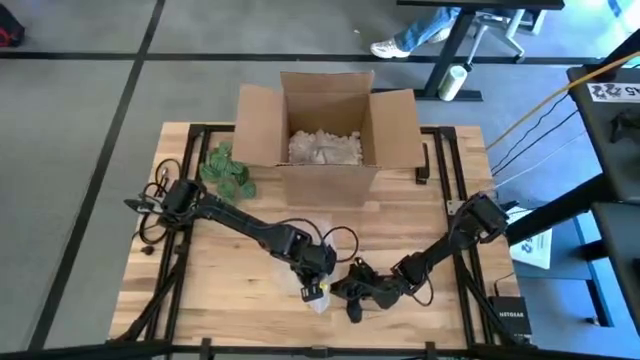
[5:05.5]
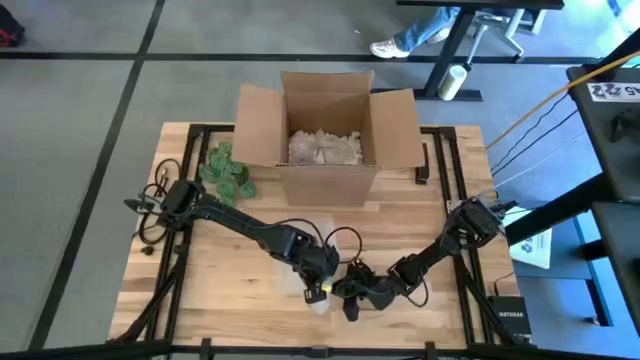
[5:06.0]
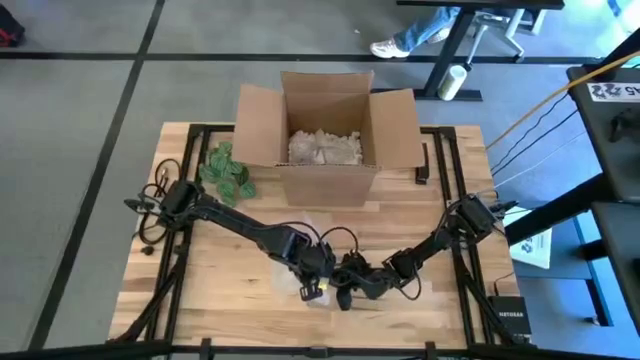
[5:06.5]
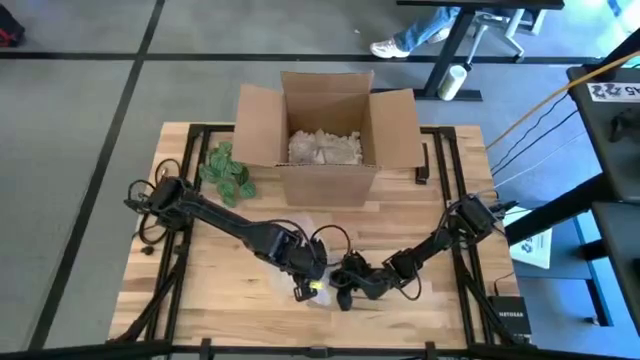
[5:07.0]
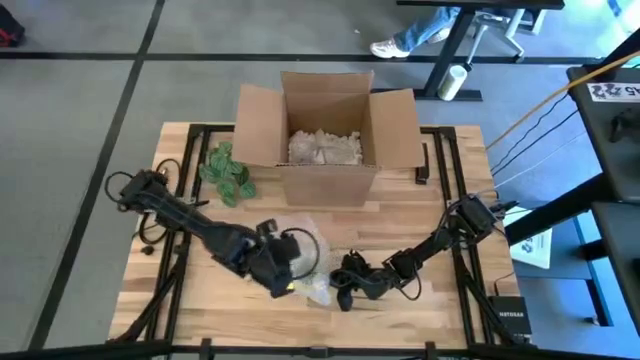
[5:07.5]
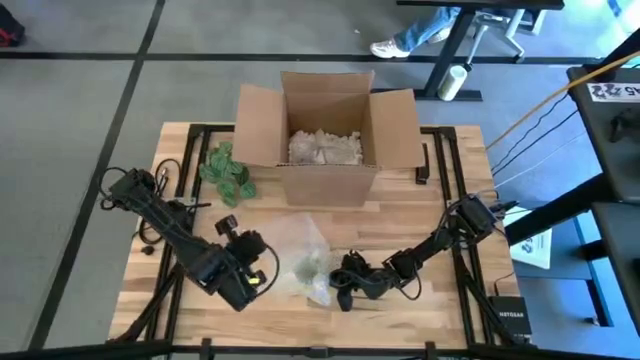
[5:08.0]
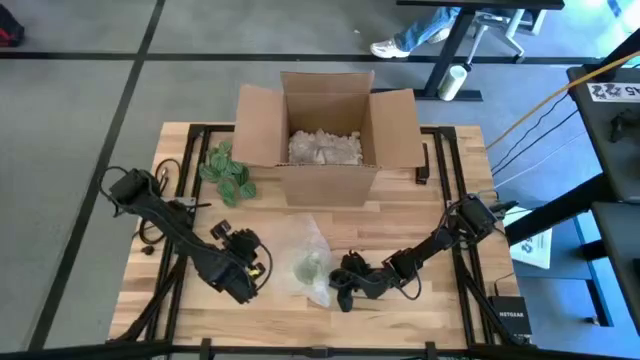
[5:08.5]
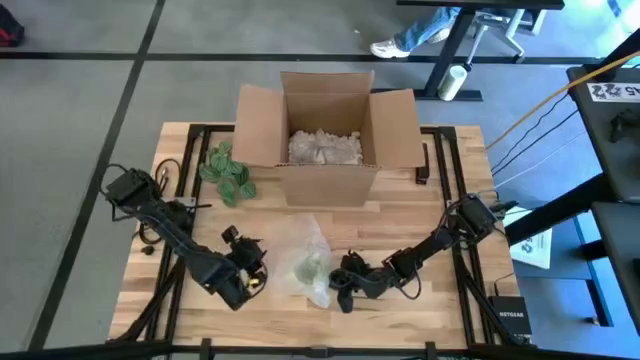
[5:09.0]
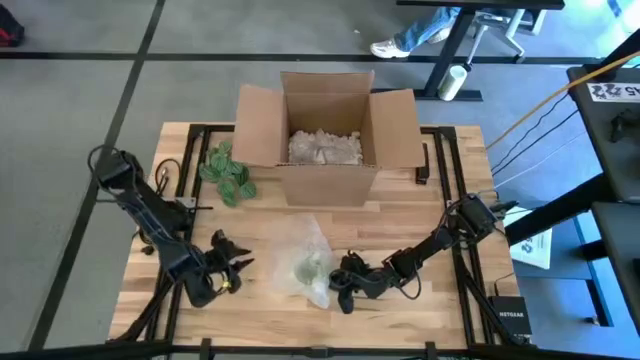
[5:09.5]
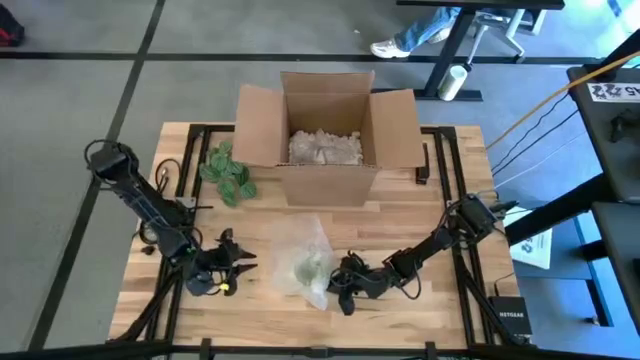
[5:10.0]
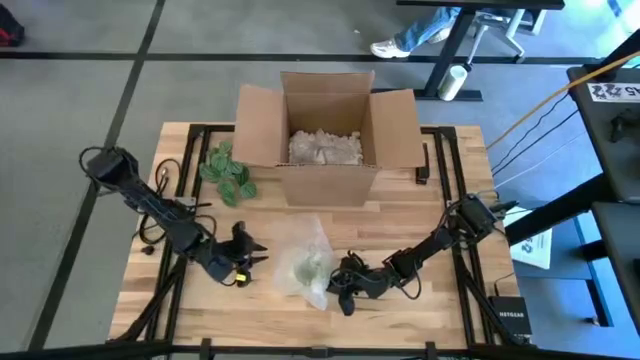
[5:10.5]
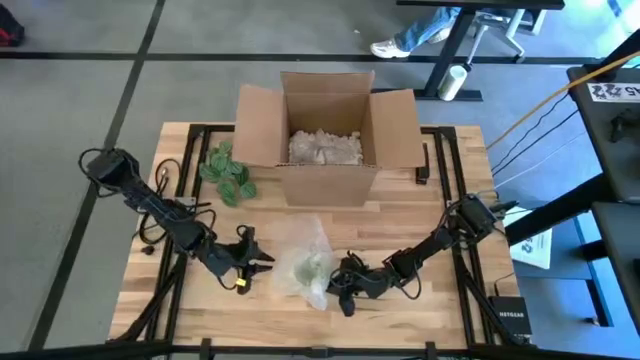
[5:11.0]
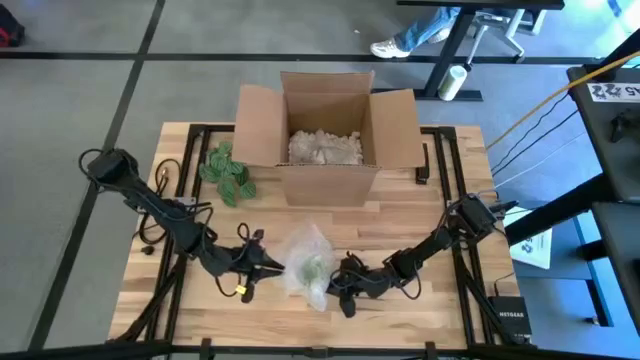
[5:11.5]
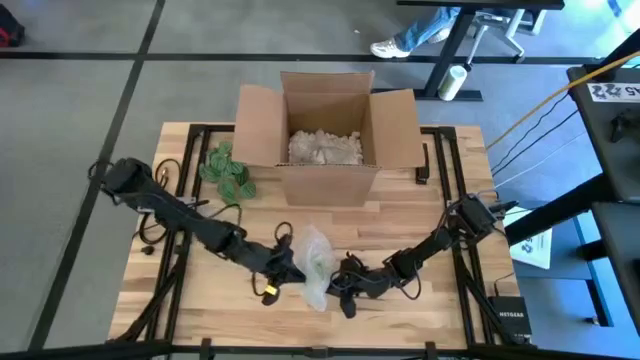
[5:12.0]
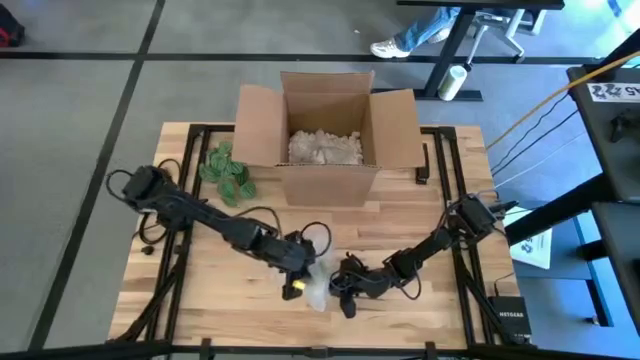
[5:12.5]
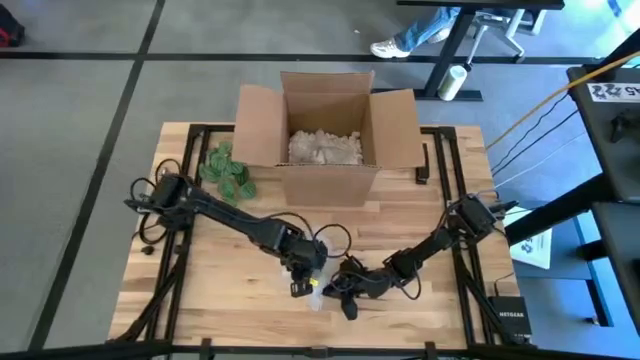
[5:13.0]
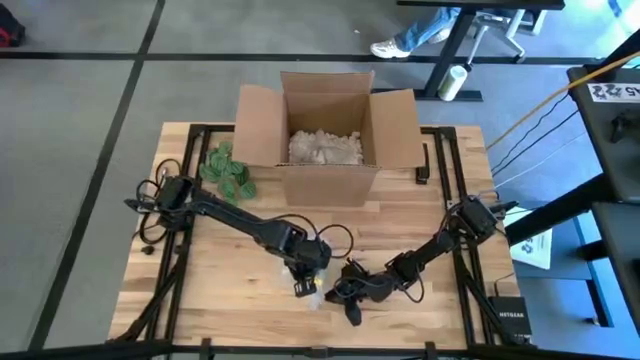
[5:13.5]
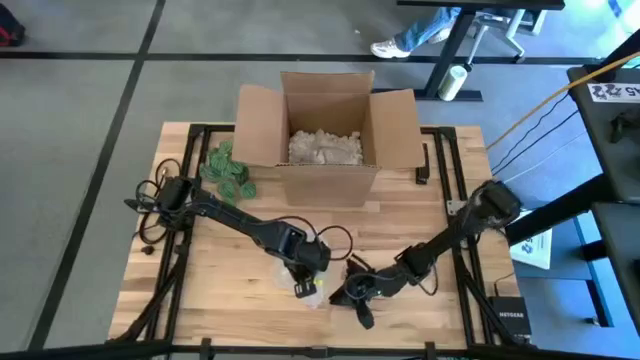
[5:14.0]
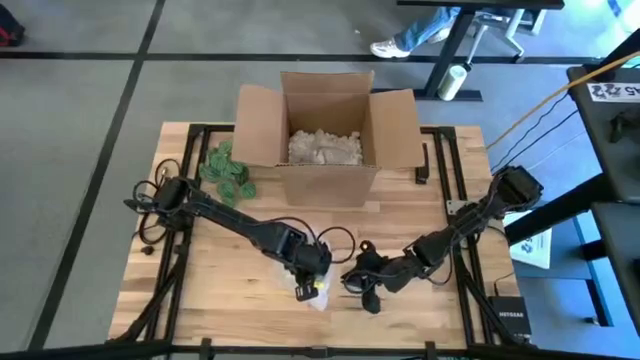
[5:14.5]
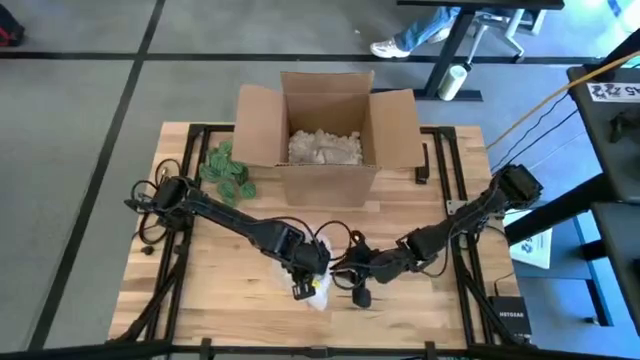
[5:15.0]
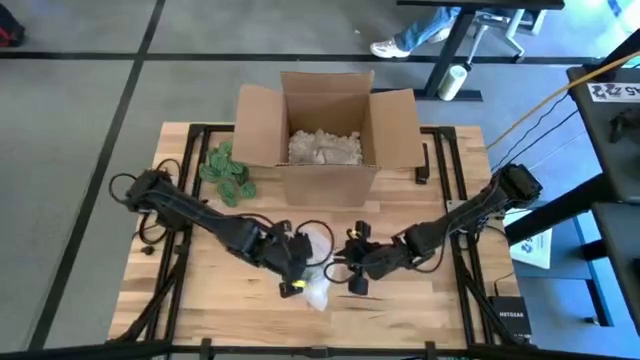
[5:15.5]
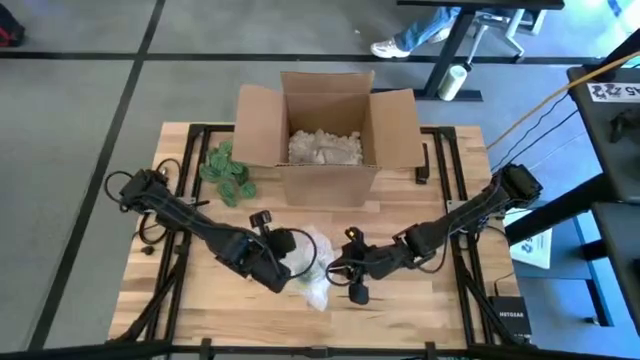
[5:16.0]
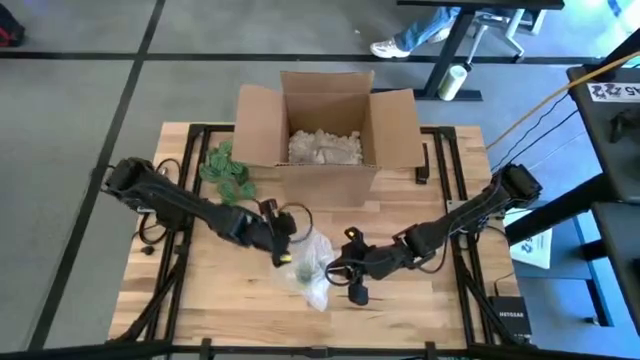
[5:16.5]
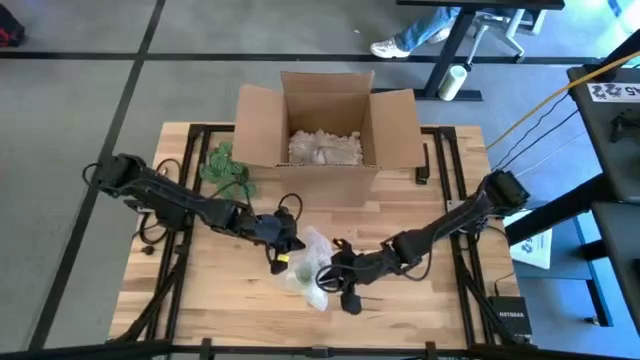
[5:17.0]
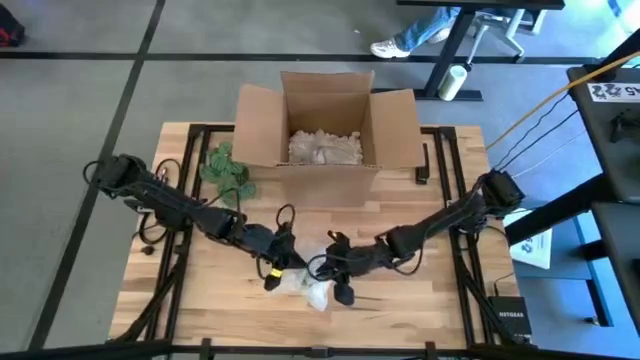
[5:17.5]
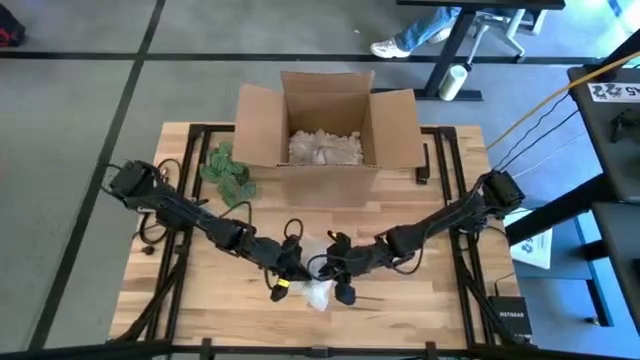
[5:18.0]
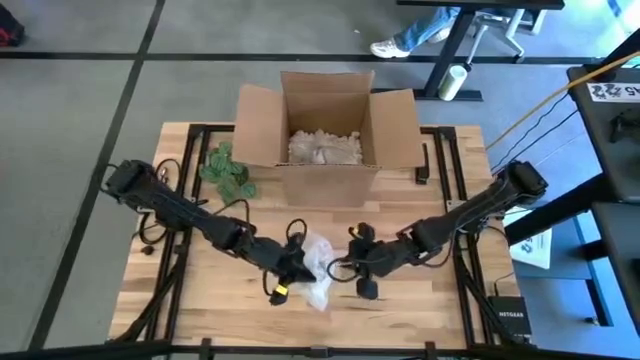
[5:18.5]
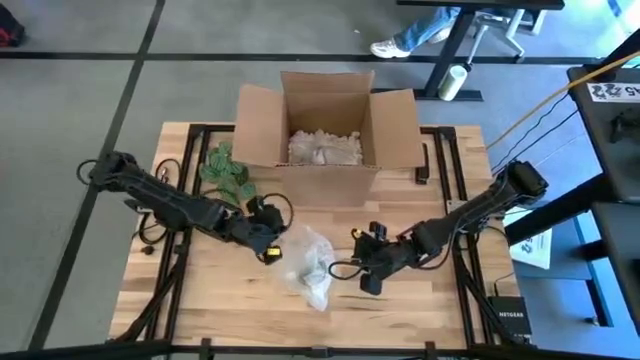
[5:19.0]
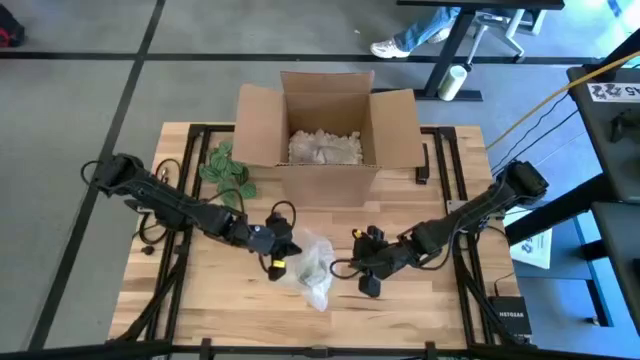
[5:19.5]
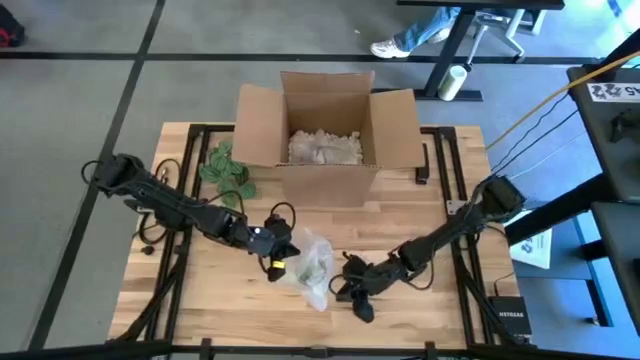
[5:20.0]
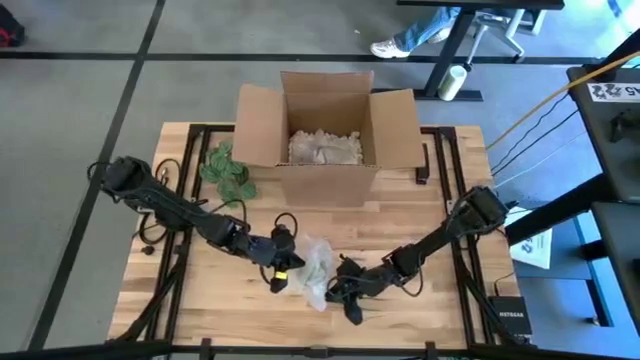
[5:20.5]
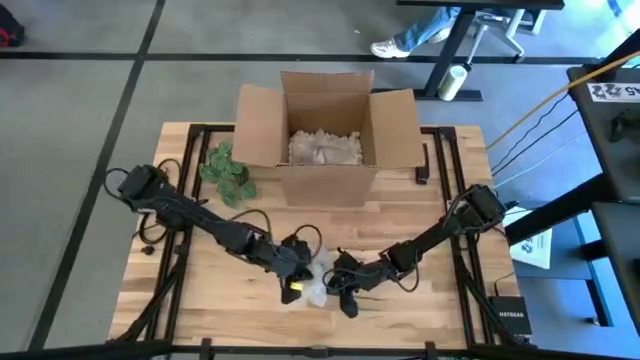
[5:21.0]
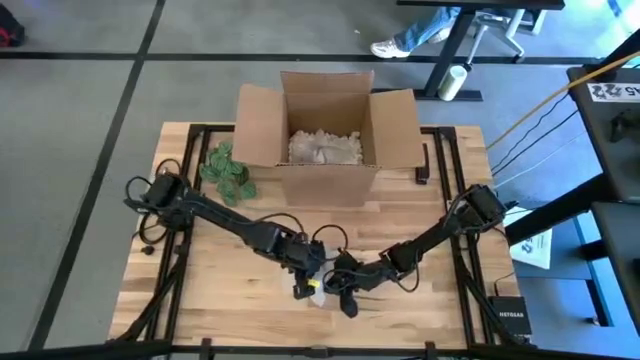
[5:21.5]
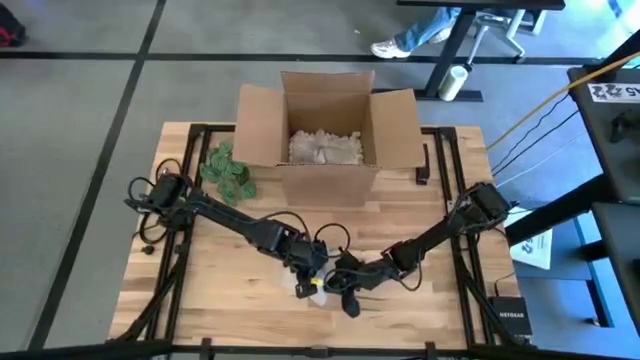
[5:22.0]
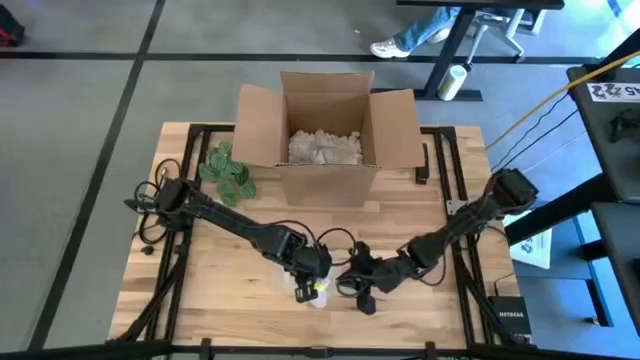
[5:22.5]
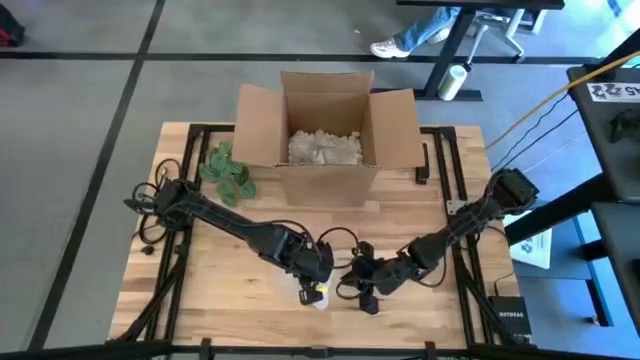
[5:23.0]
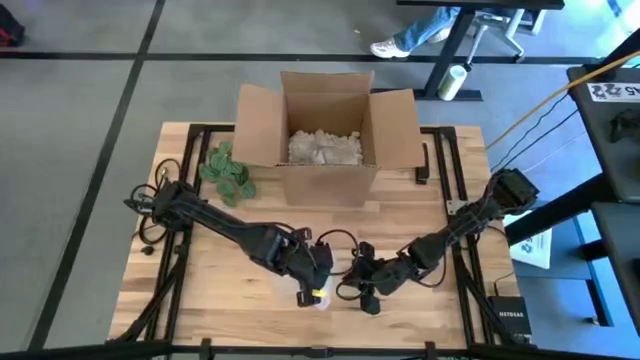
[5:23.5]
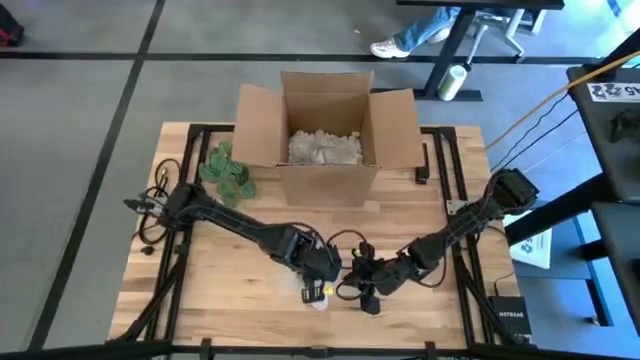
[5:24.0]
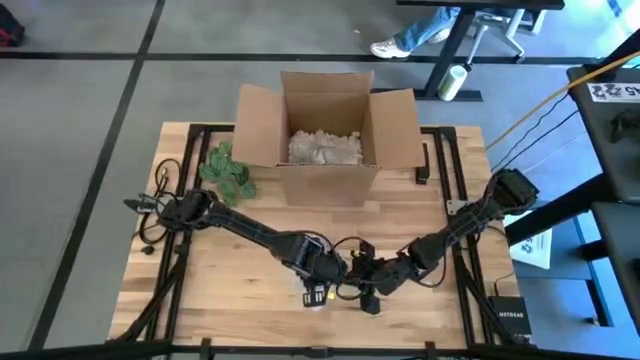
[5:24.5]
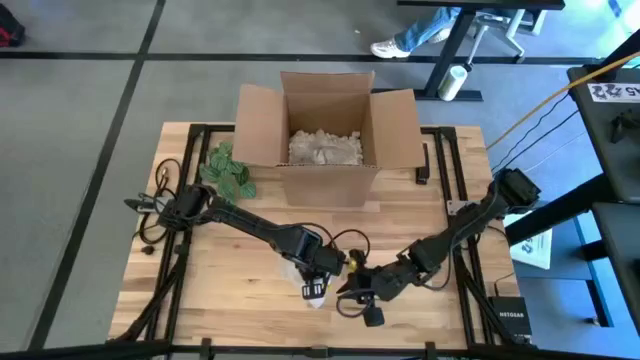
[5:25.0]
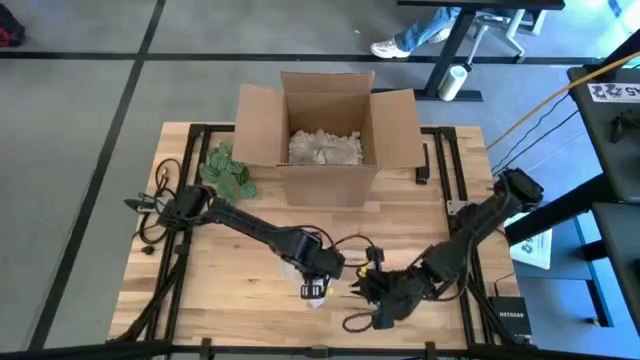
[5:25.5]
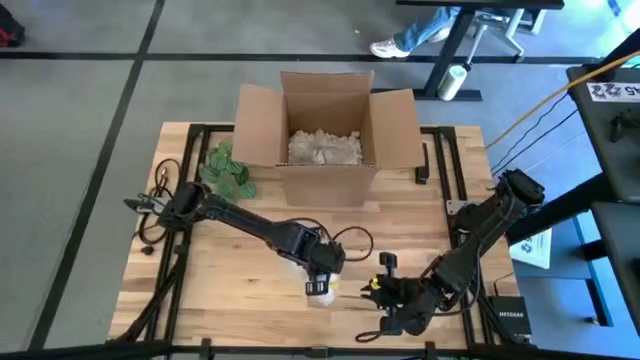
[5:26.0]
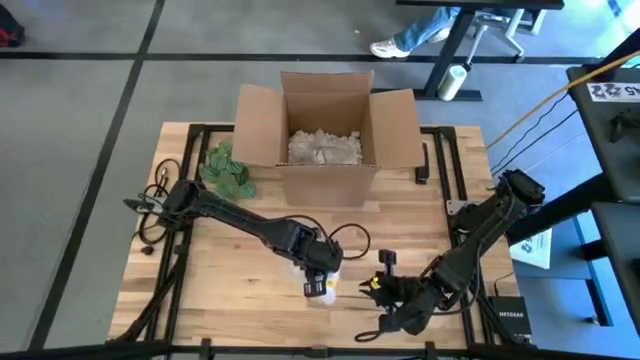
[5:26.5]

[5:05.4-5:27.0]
Task: wrap mug
Wrap the green mug in bubble wrap
